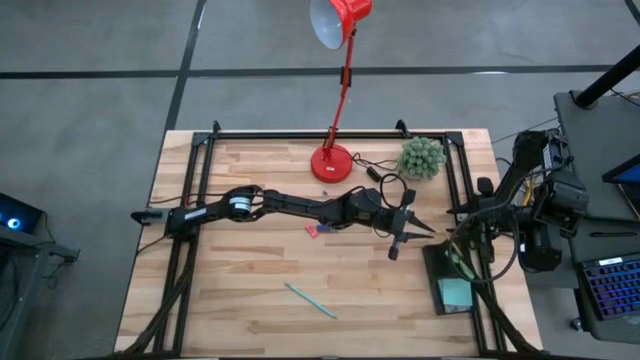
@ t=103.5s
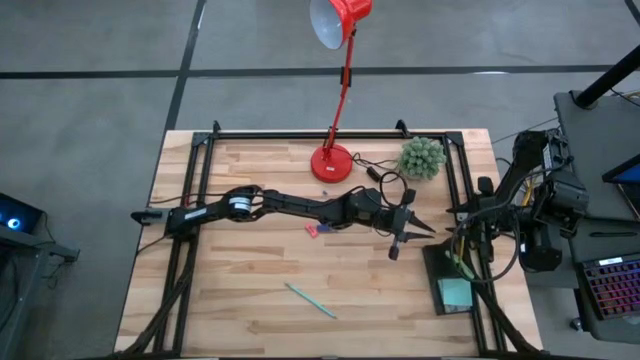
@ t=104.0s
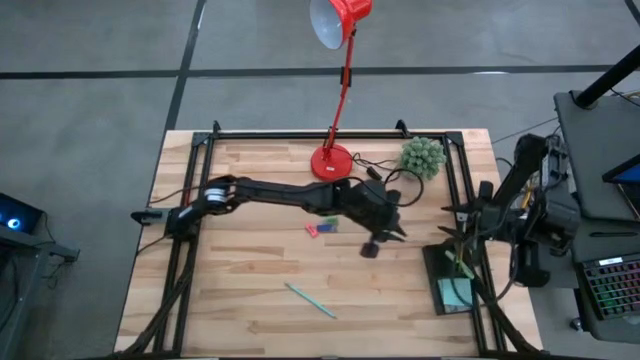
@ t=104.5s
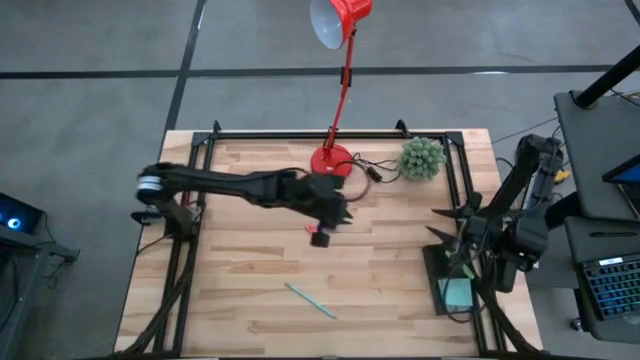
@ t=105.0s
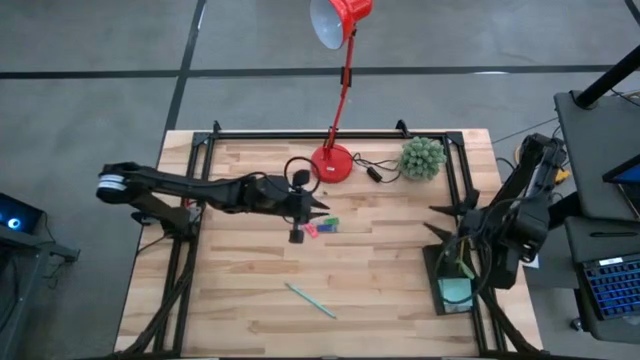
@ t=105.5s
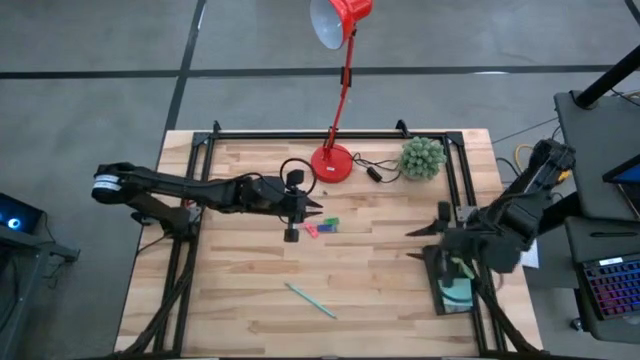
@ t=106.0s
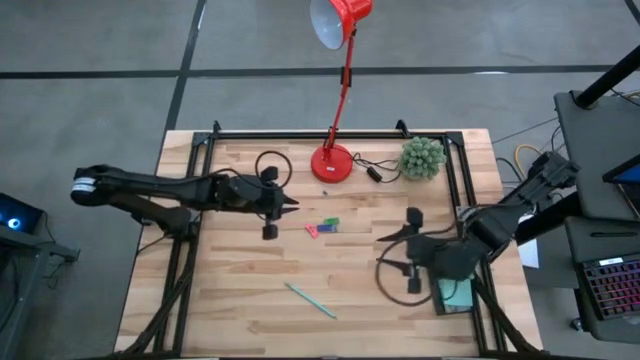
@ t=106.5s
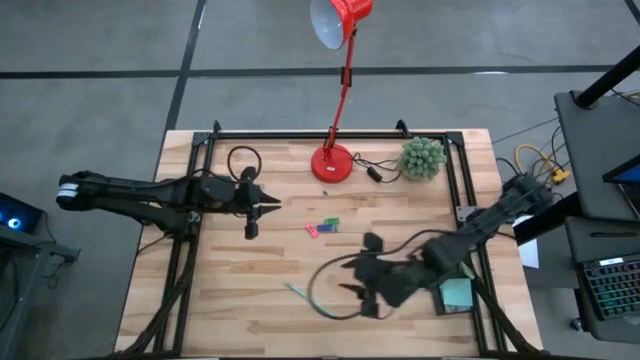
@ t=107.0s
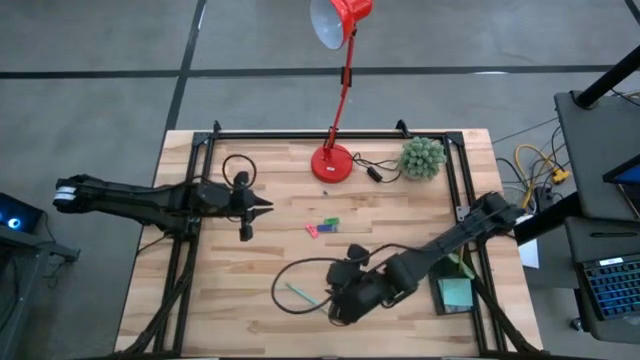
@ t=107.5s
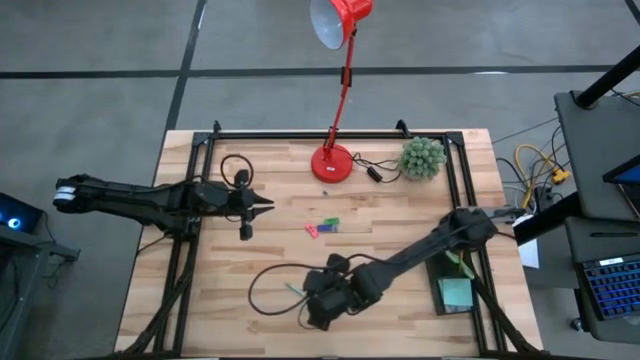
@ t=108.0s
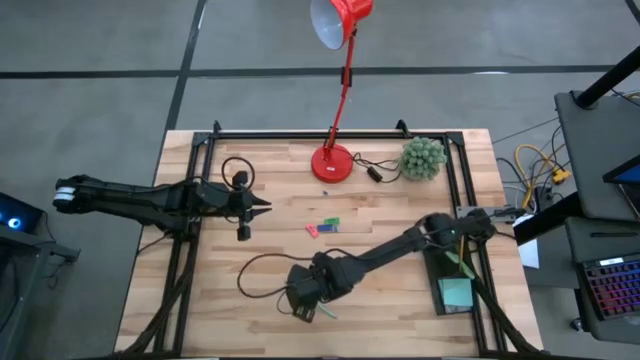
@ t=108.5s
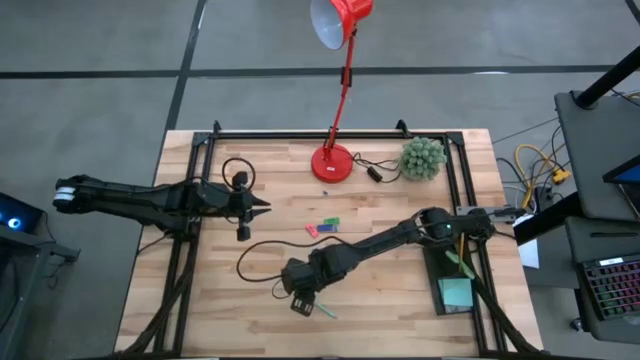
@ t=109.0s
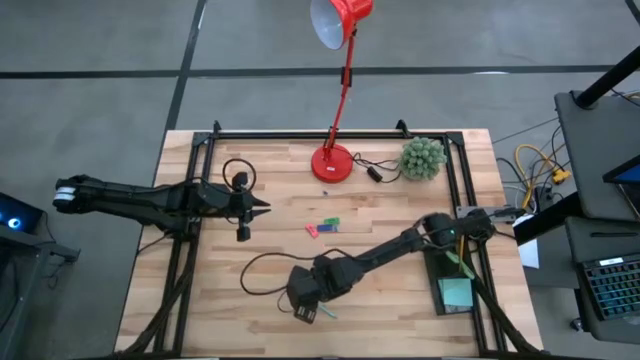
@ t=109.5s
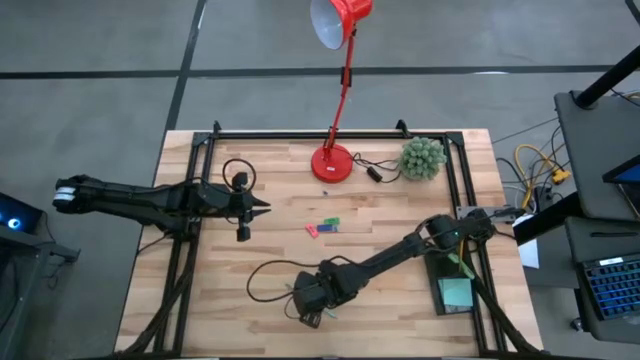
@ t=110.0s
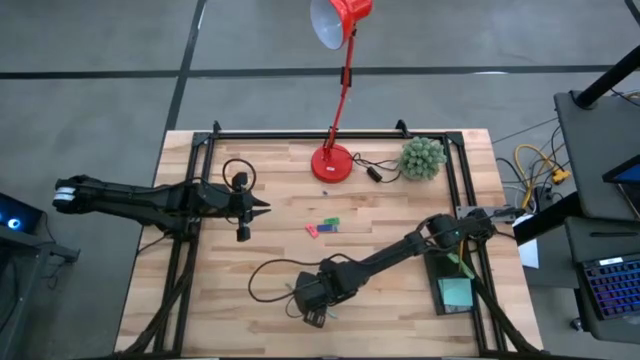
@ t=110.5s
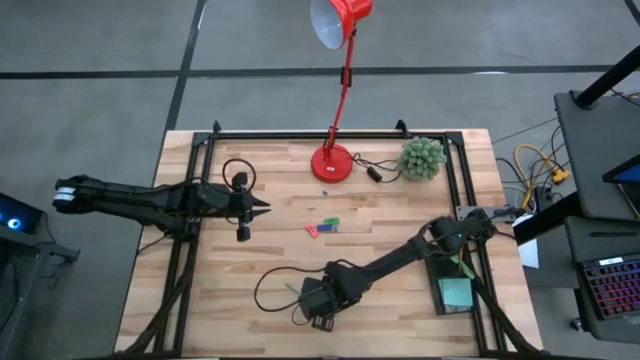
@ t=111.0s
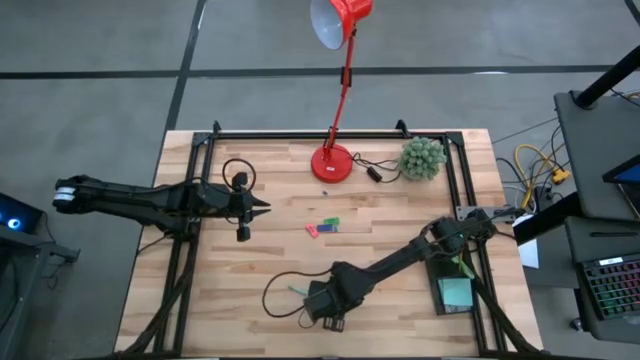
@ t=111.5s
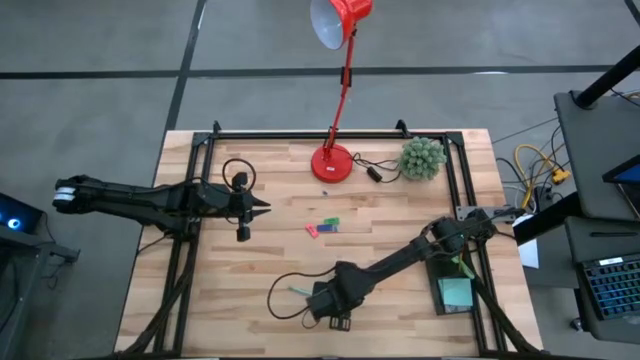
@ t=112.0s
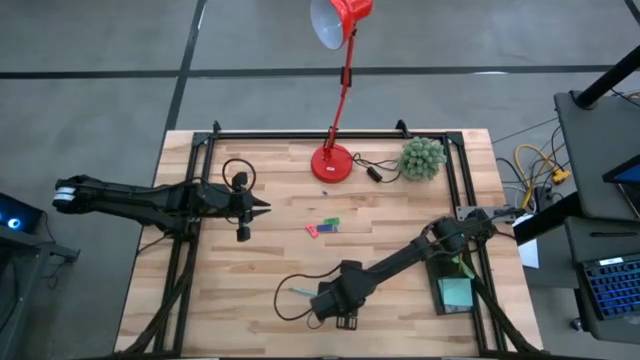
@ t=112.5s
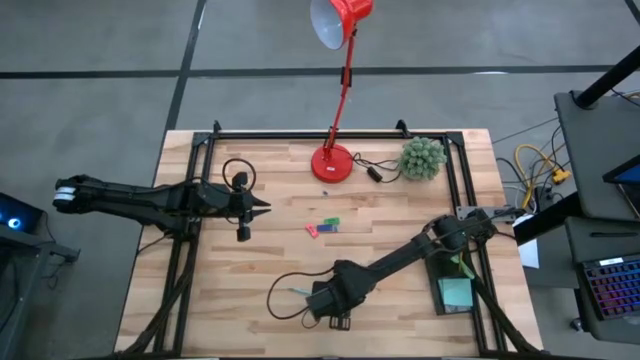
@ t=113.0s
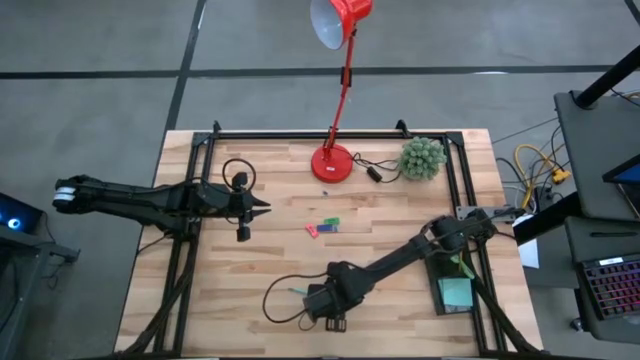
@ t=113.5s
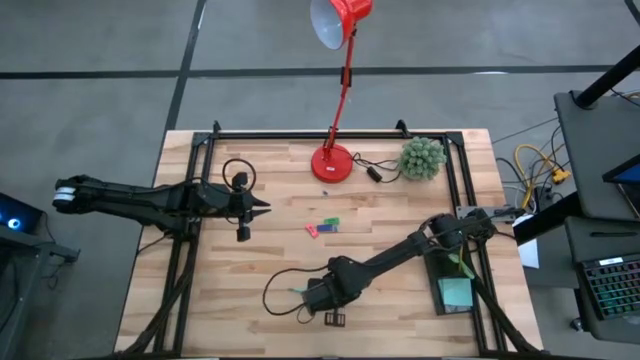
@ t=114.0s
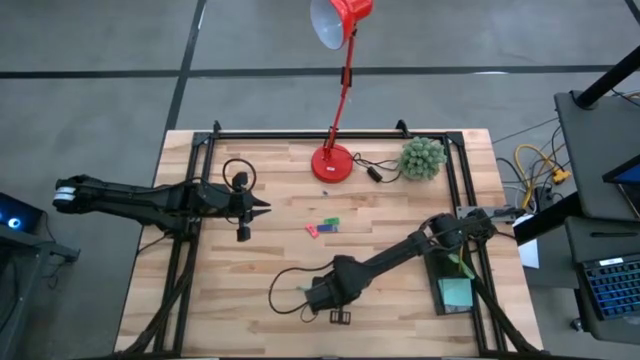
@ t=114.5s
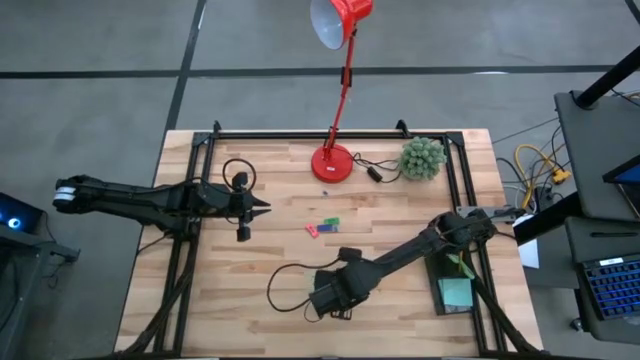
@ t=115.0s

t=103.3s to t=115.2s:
Task: Pick and place office supplies into organizer
Put the blue pencil into the black desk organizer

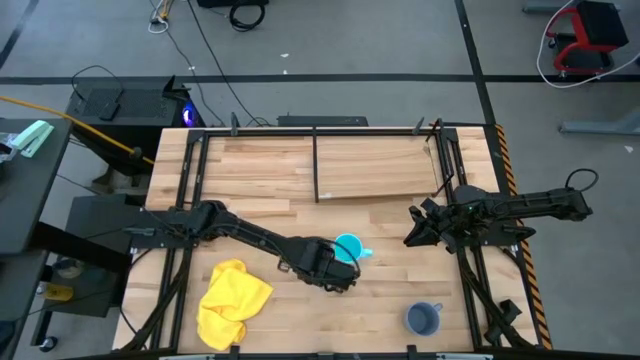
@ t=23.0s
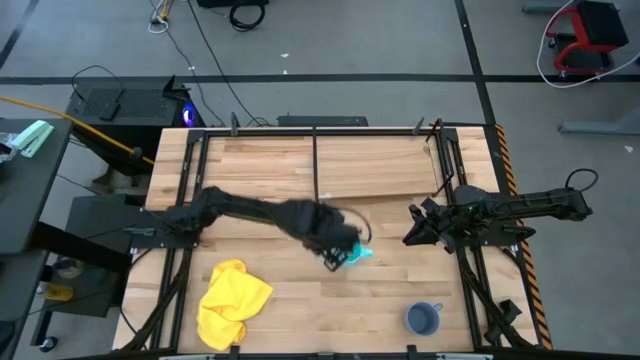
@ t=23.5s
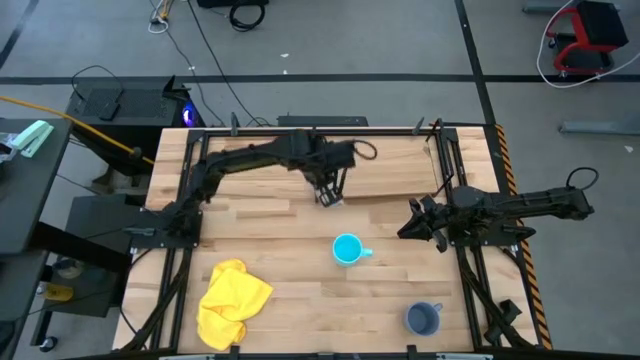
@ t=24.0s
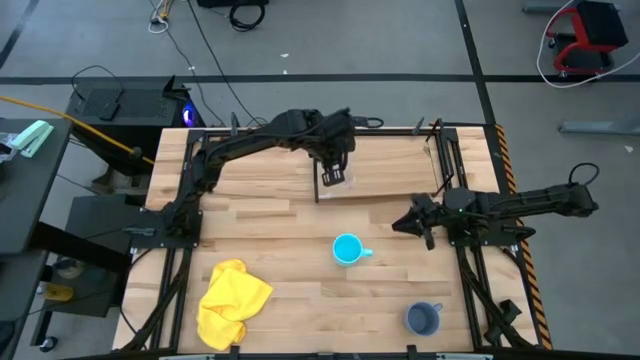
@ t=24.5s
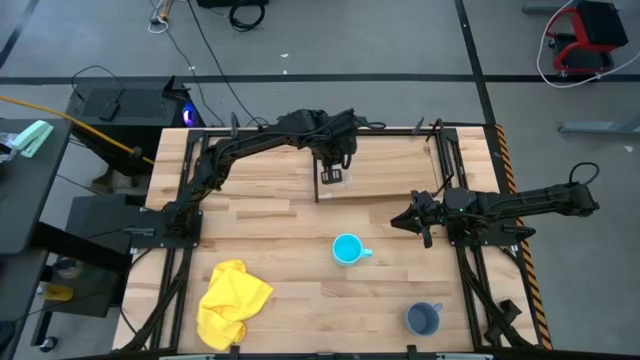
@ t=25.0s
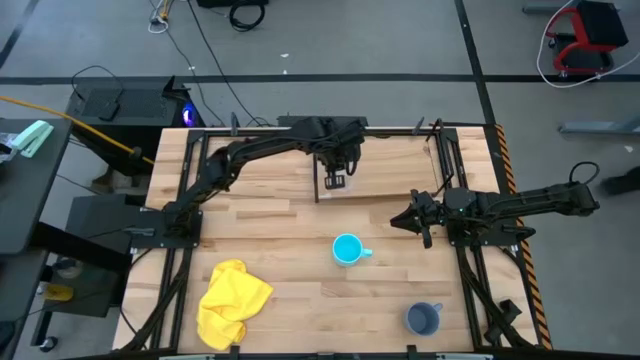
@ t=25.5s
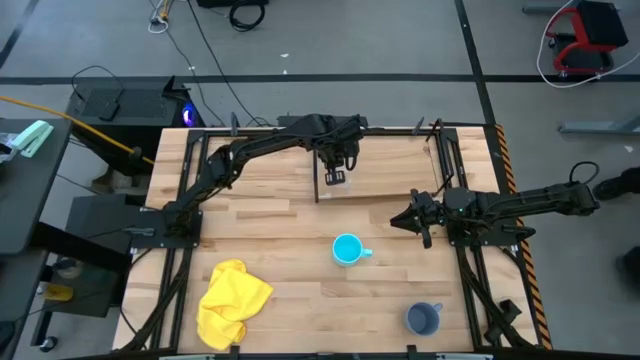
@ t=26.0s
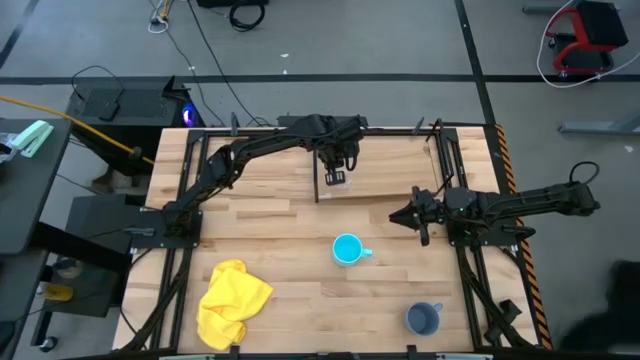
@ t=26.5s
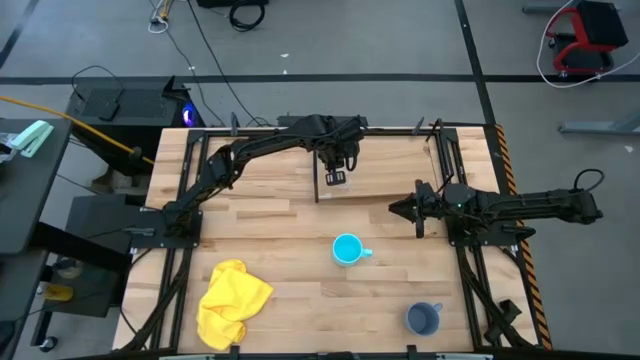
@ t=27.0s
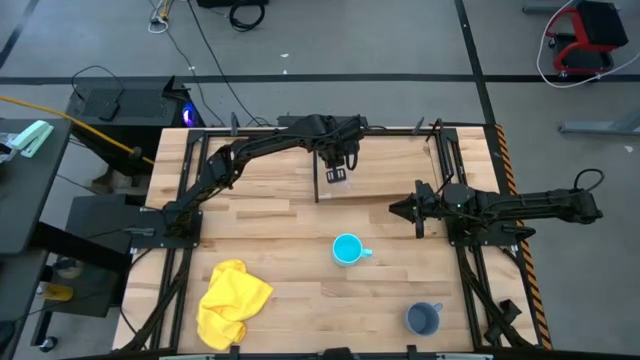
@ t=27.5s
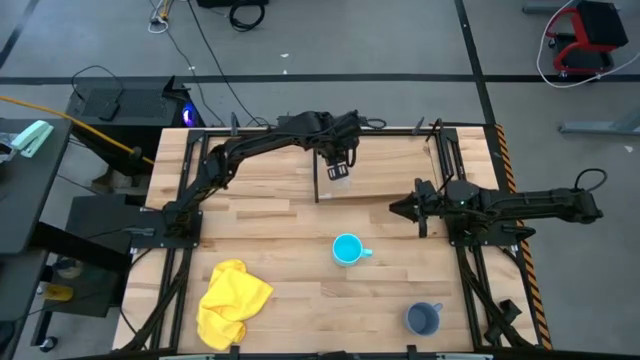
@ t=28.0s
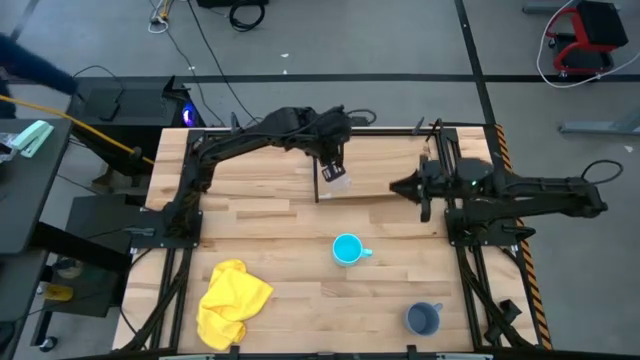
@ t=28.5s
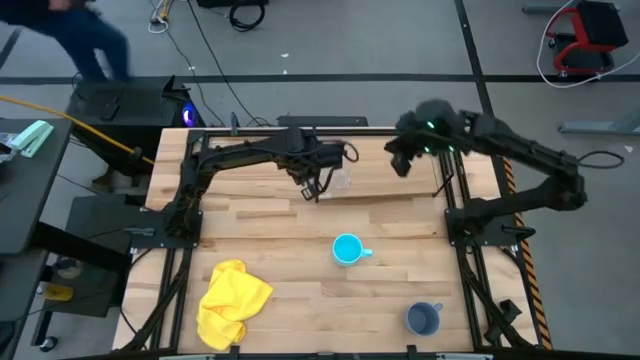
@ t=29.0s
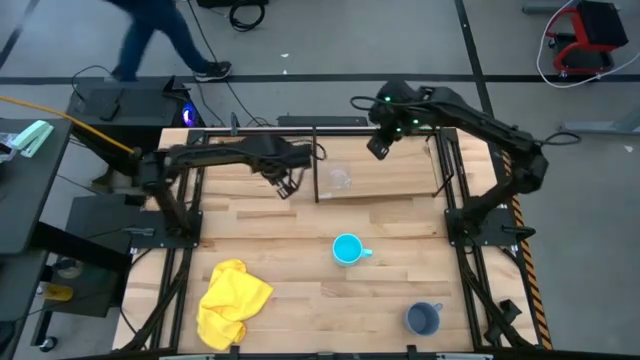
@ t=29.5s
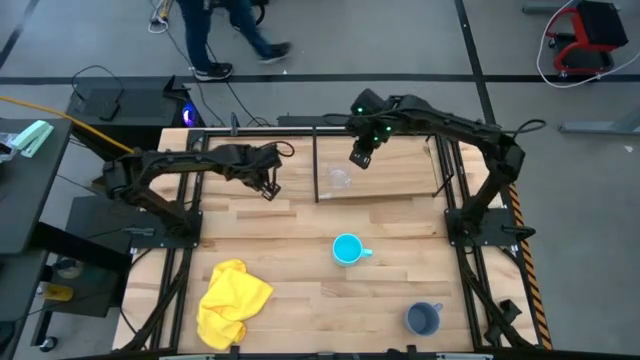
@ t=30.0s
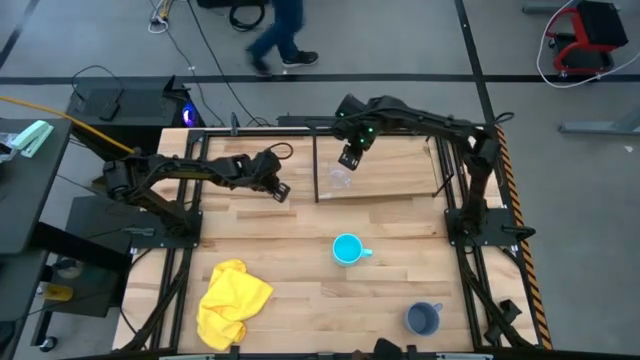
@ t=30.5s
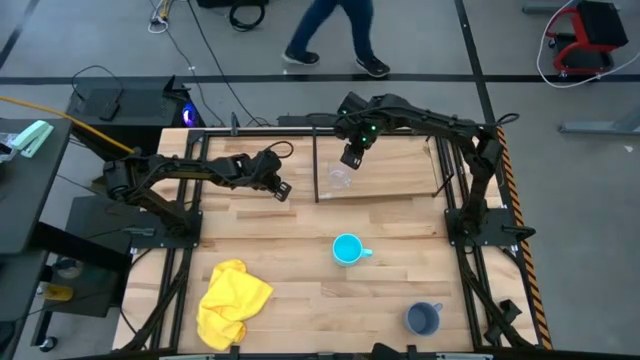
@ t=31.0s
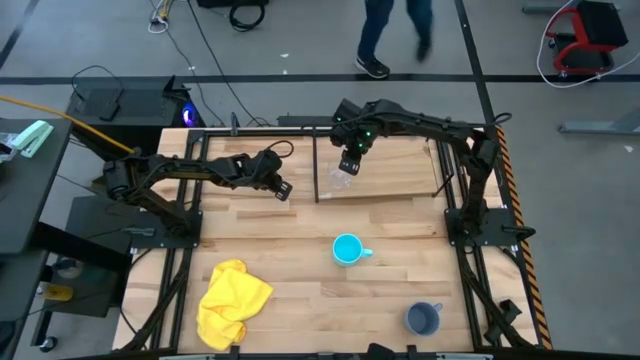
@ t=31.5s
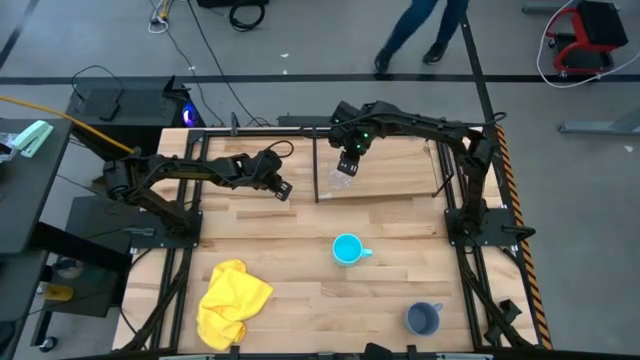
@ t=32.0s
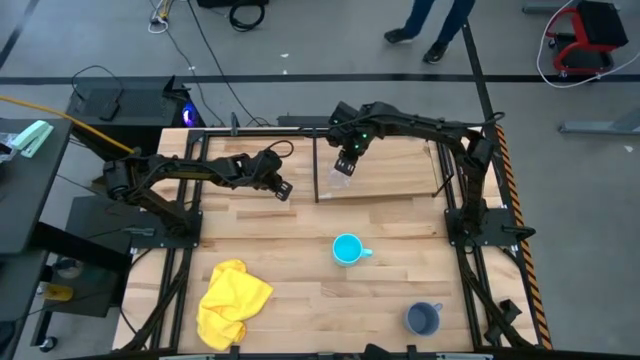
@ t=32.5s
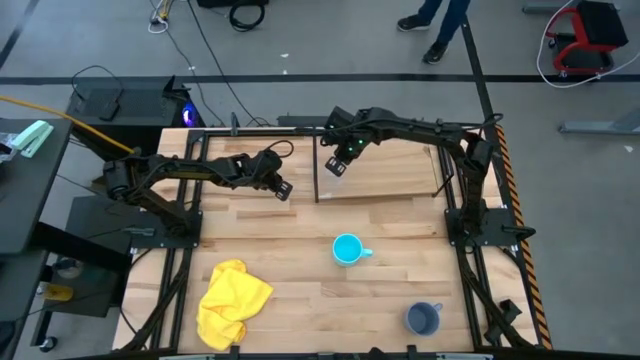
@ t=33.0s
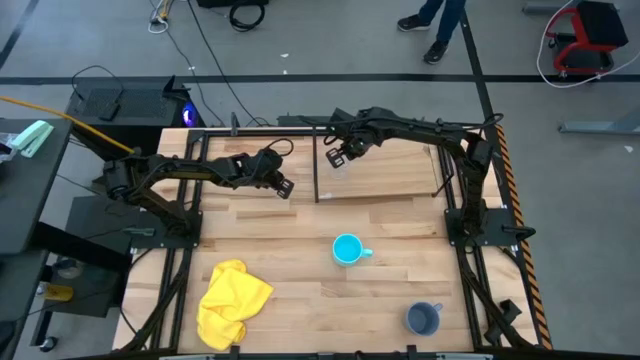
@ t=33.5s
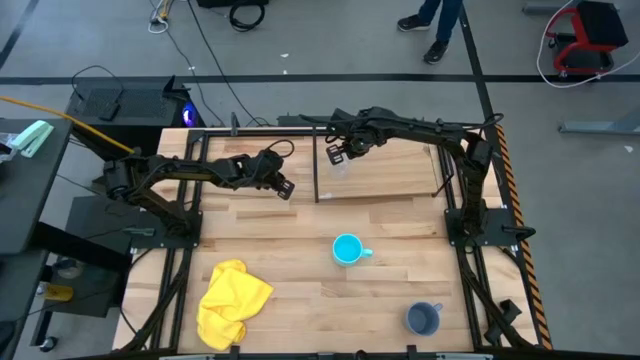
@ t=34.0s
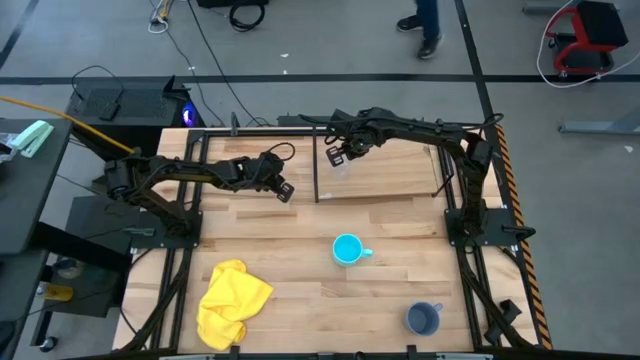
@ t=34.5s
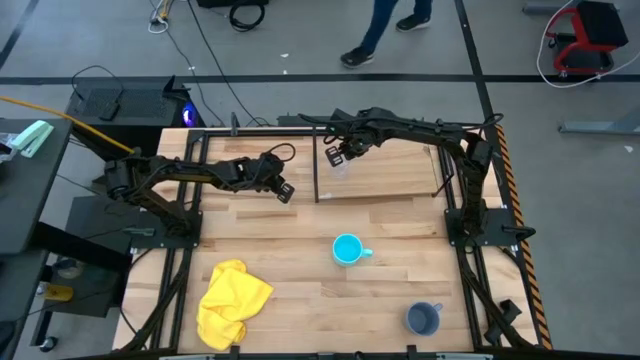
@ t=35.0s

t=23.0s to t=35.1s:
Task: Stack small to large cups/mugs on shelf
Put the transparent mug on the shelf
